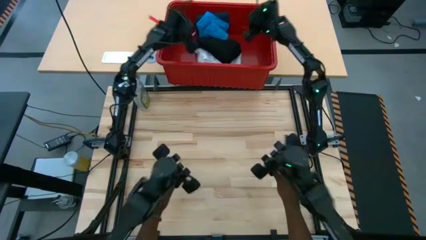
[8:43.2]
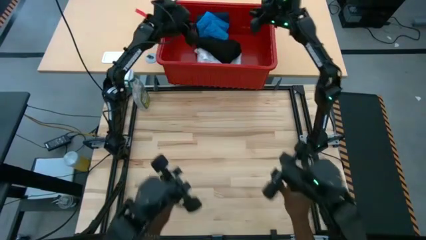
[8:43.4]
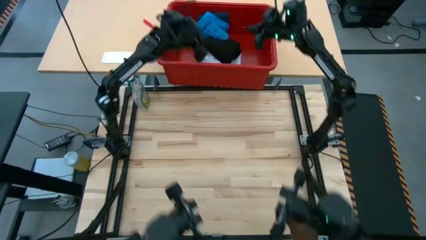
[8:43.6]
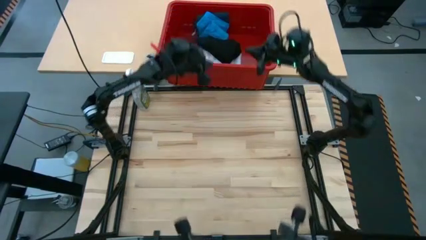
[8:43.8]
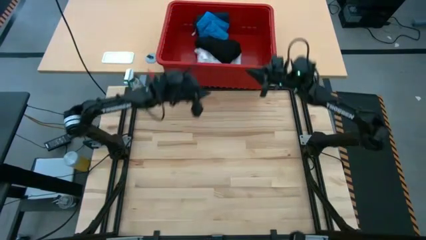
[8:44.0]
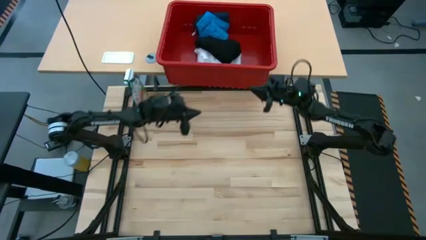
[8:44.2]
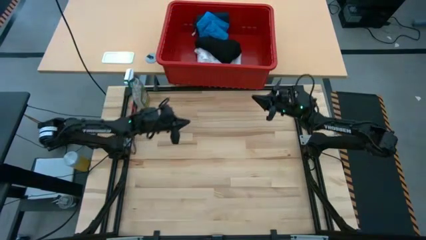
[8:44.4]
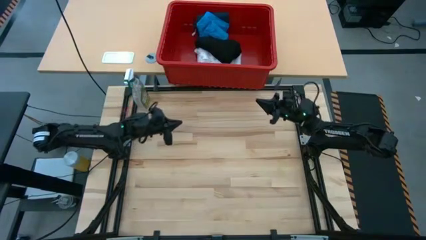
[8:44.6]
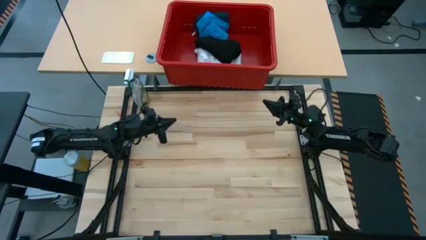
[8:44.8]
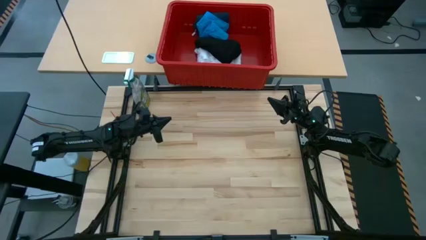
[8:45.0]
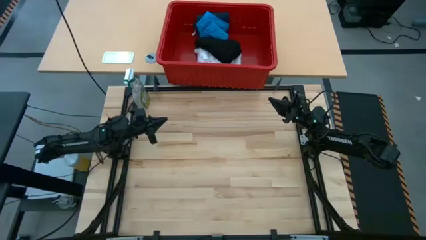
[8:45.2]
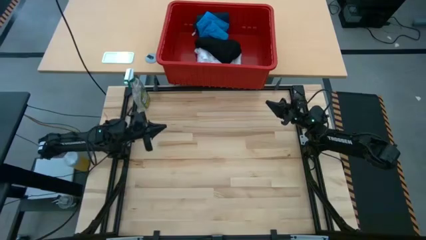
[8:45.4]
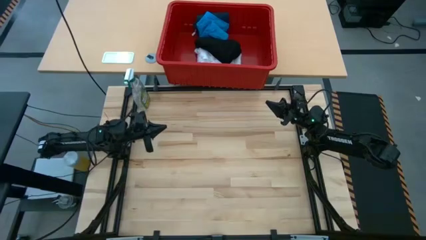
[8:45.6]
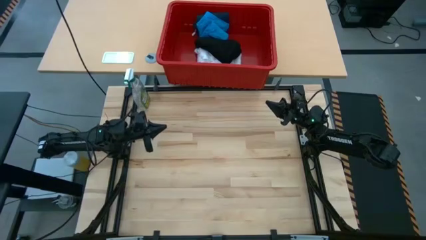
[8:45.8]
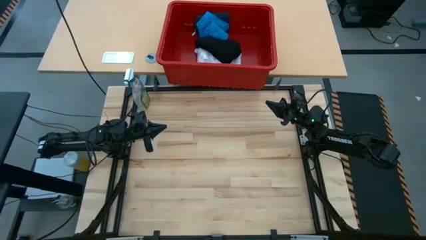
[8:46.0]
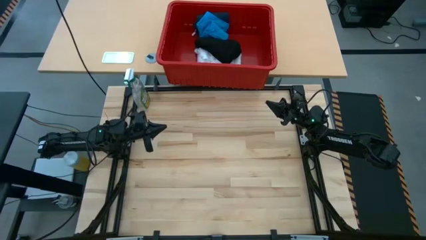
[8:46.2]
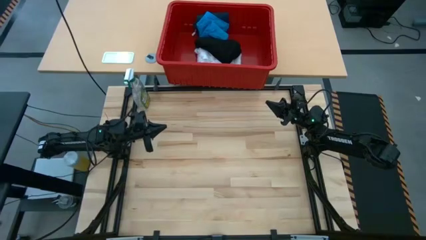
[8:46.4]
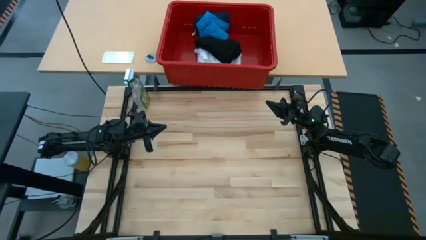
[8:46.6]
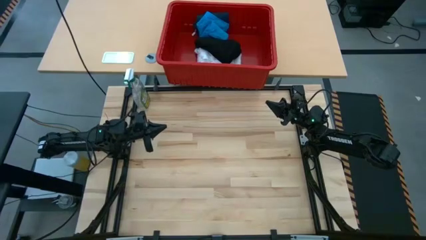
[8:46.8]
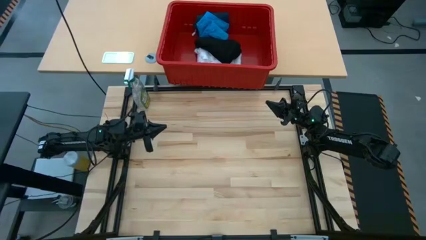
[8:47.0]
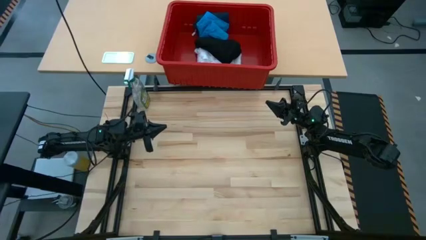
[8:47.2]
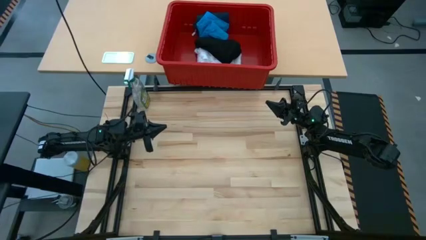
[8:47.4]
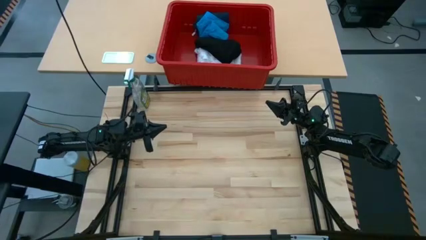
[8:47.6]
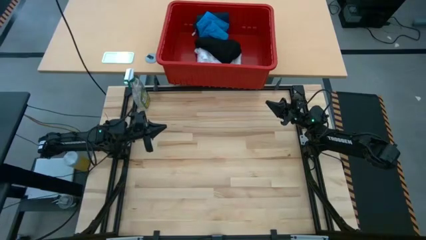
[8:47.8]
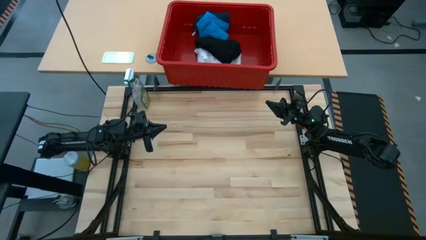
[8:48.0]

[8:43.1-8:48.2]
Task: Fold laundry
Return to Home Position

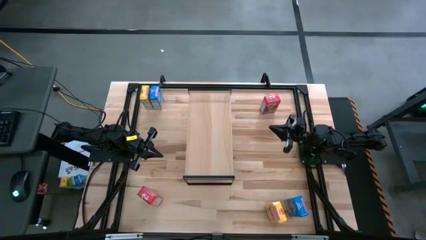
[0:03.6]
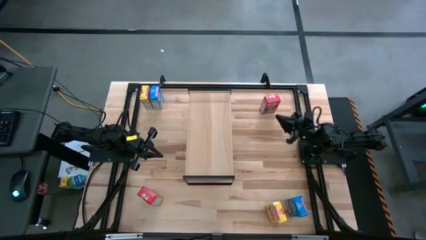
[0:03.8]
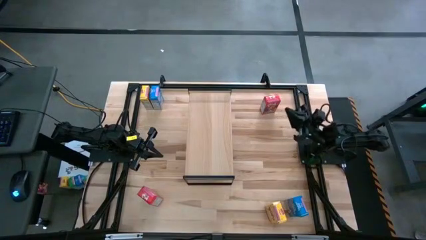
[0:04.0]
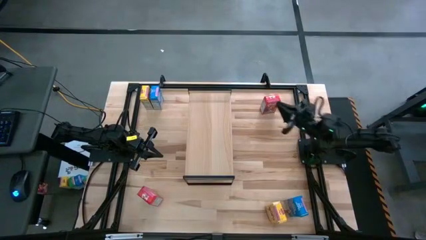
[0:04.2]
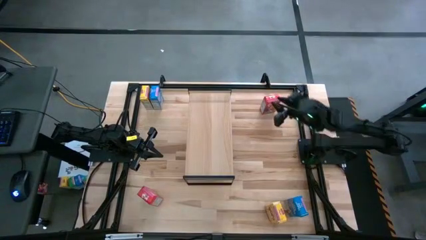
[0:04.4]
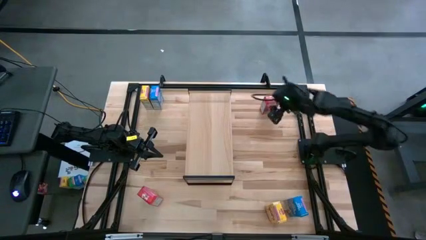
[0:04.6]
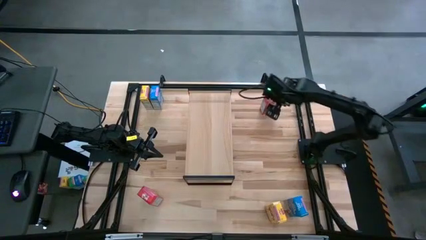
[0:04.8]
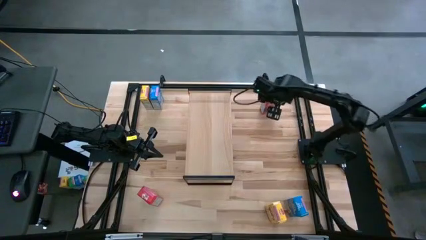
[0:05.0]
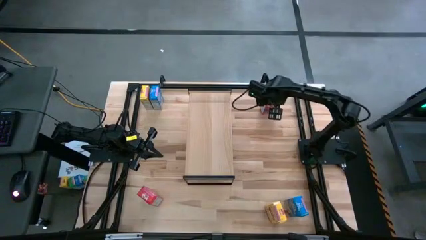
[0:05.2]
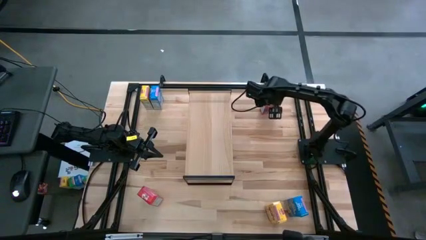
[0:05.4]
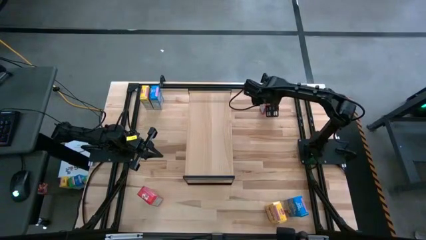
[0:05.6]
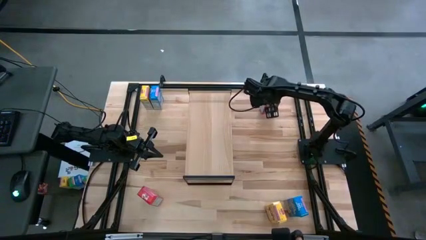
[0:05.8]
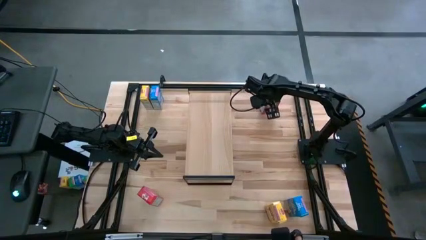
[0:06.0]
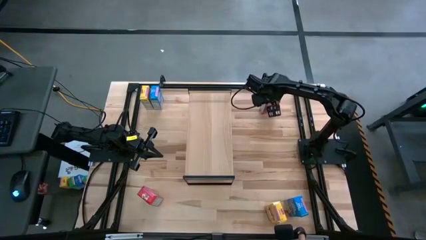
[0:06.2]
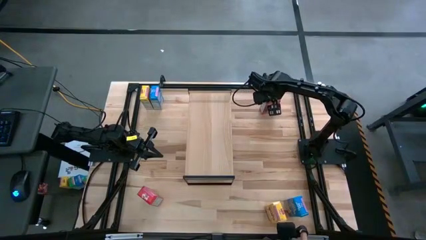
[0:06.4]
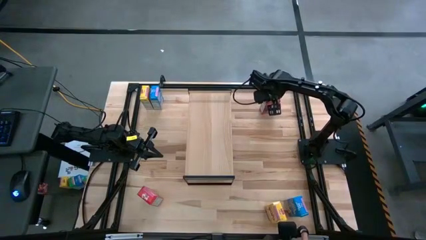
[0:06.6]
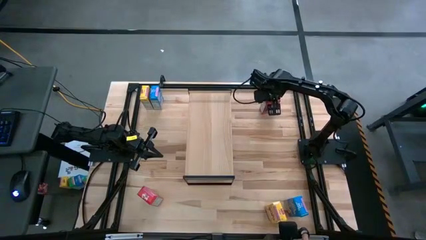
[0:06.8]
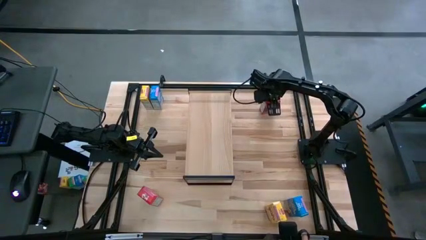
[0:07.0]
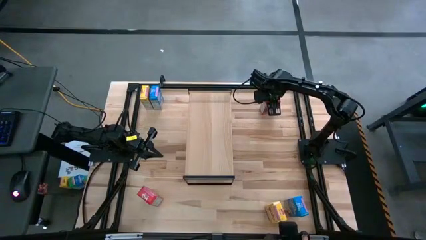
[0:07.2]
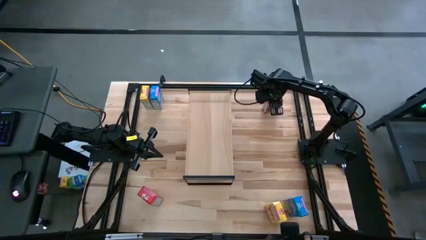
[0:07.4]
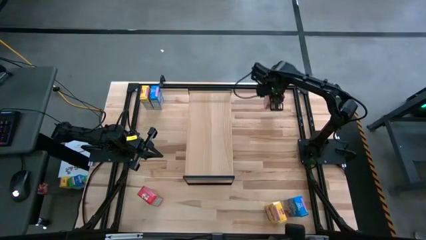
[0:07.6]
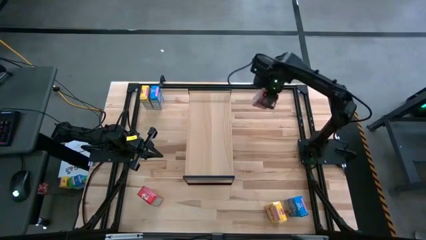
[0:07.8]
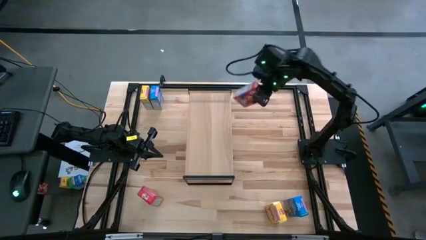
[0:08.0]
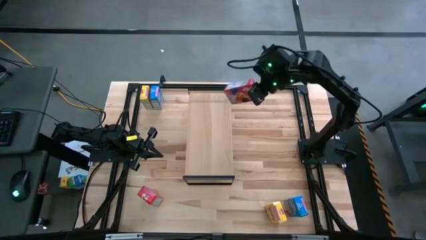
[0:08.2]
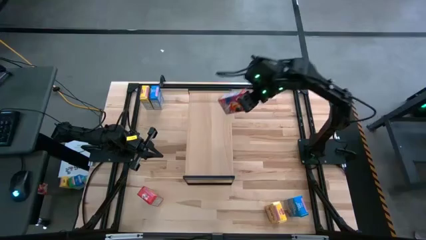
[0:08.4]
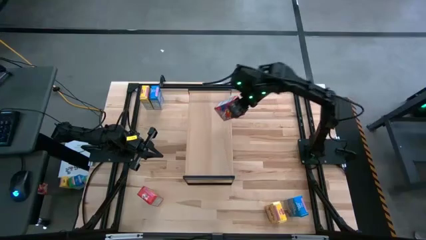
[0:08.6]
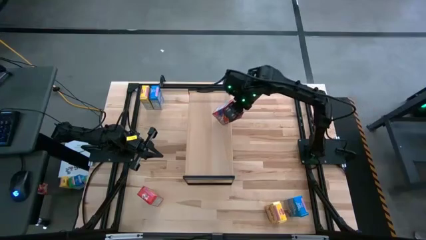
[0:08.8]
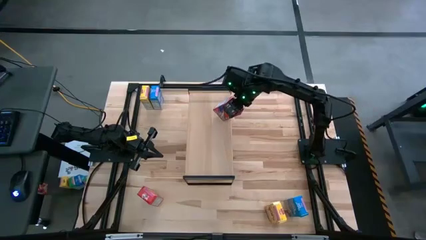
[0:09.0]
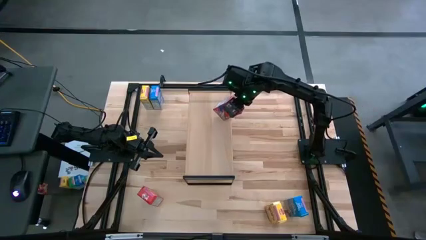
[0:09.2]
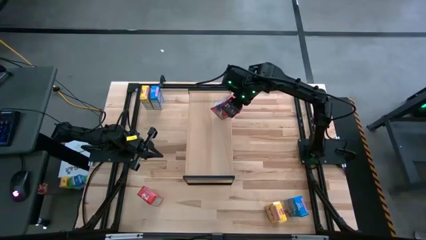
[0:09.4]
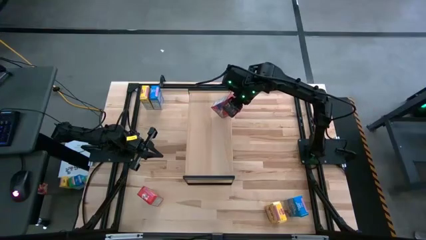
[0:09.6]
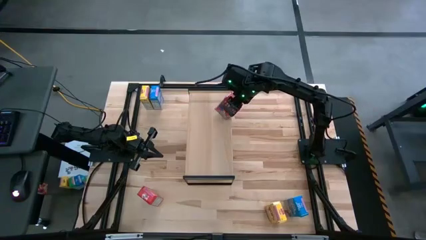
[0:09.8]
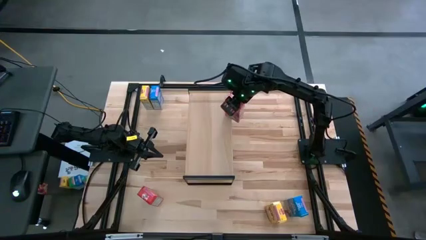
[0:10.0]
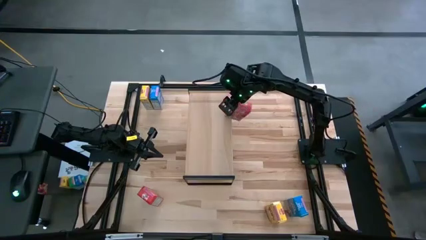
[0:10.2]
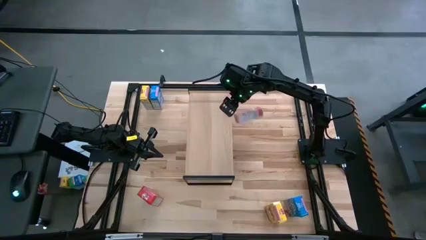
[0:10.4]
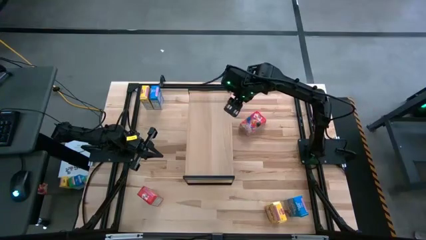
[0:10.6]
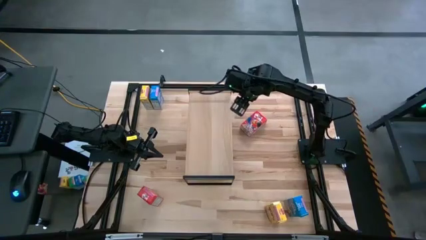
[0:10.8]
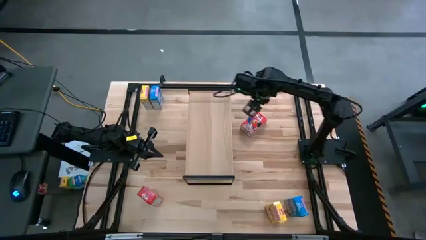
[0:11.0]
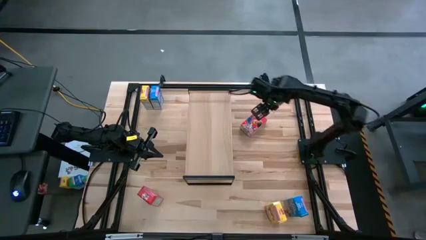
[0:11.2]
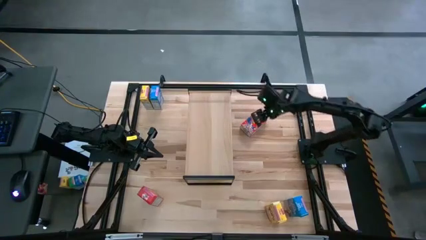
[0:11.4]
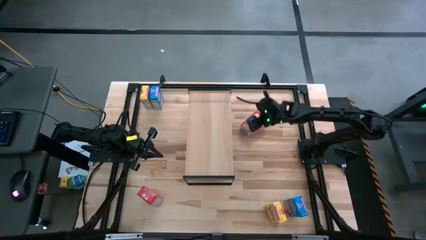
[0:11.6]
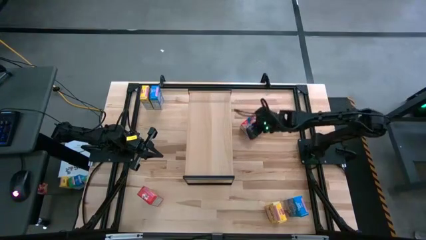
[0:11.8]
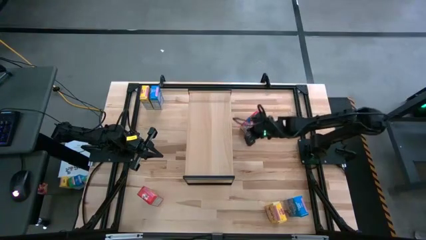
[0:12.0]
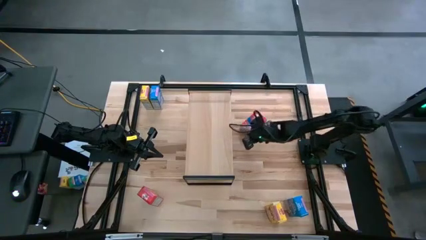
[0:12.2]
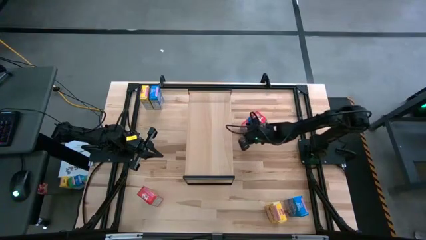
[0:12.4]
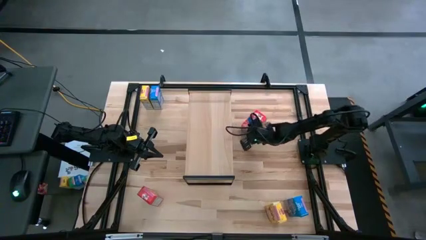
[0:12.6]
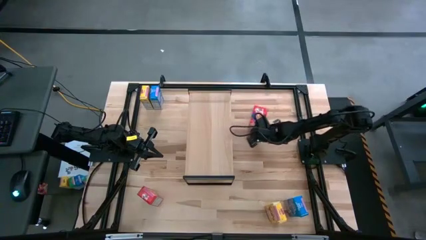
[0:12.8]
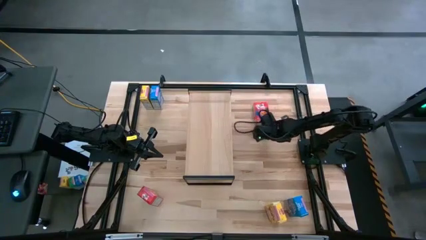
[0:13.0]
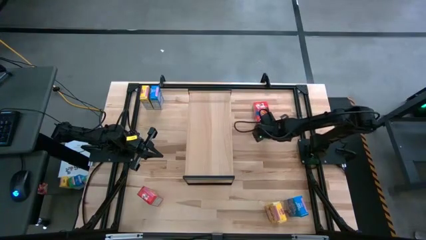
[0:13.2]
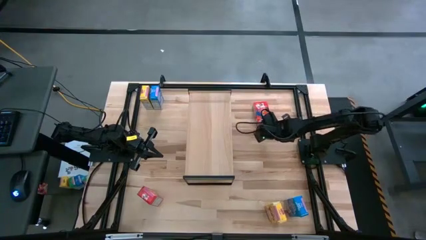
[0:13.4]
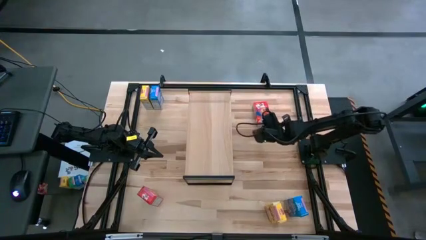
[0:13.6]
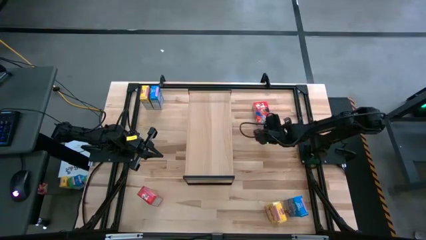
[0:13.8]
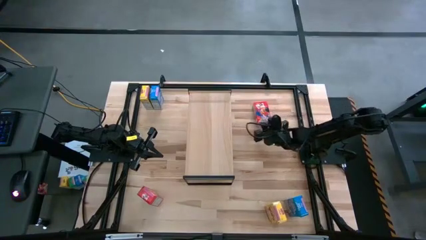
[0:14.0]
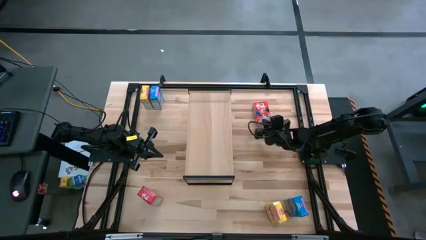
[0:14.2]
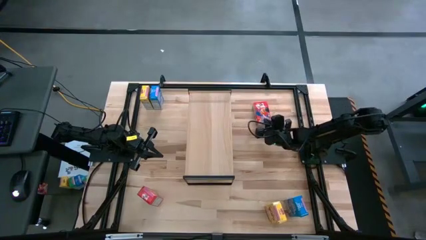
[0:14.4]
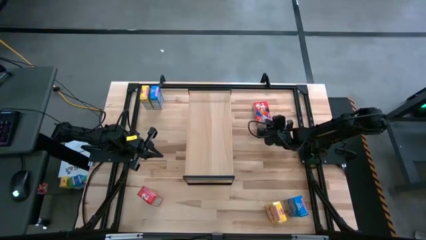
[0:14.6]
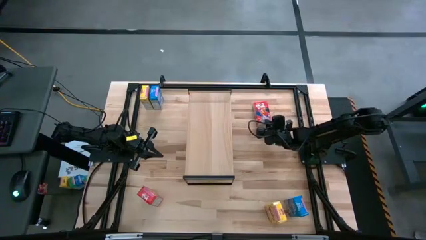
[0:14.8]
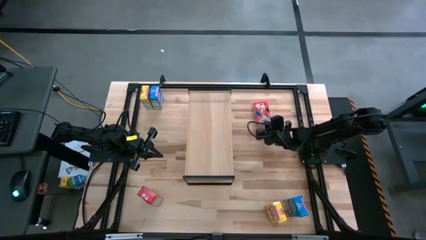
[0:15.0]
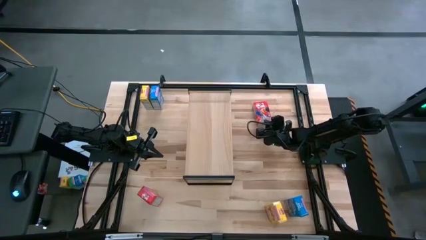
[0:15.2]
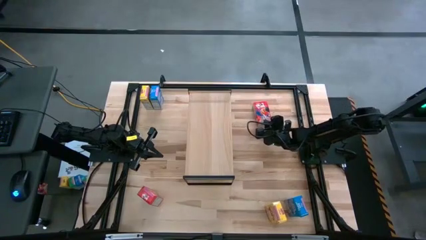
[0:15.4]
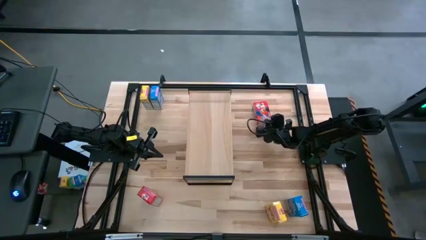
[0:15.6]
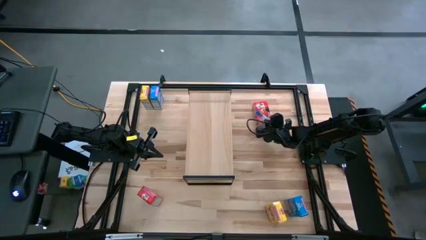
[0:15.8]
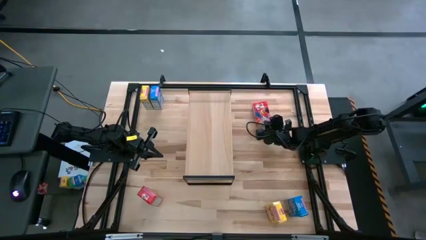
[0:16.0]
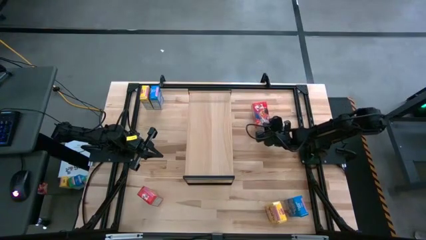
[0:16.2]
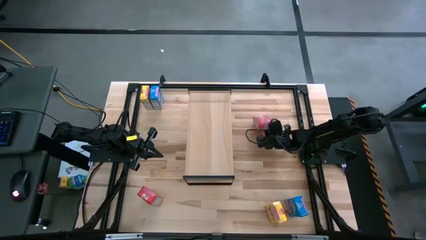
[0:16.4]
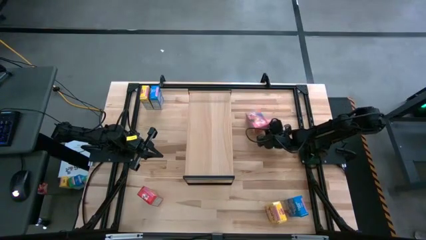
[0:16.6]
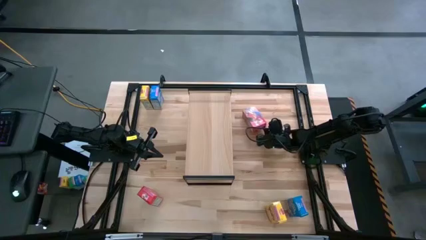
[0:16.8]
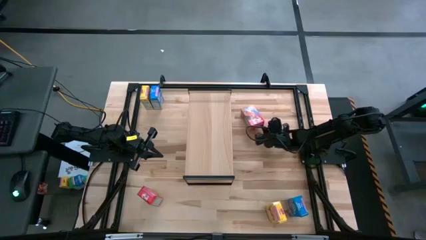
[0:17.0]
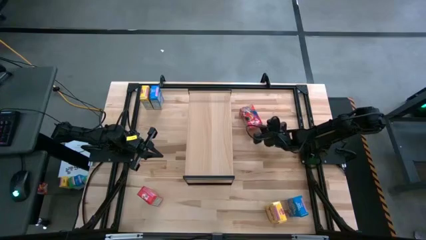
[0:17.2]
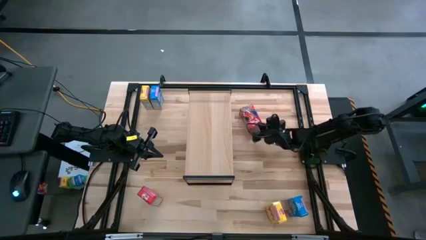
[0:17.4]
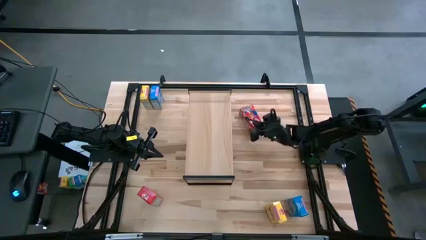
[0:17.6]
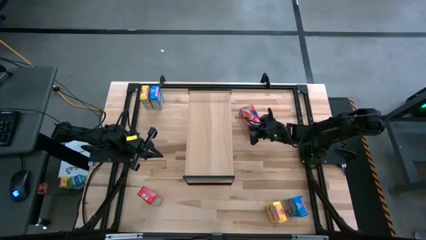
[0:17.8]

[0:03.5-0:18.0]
Task: Stack cereal on shelf
Put the top red cereal box on the shelf
